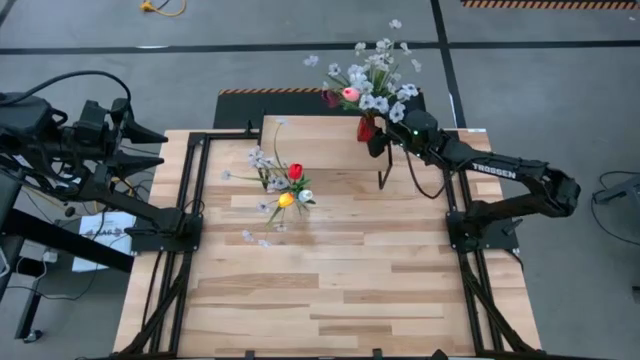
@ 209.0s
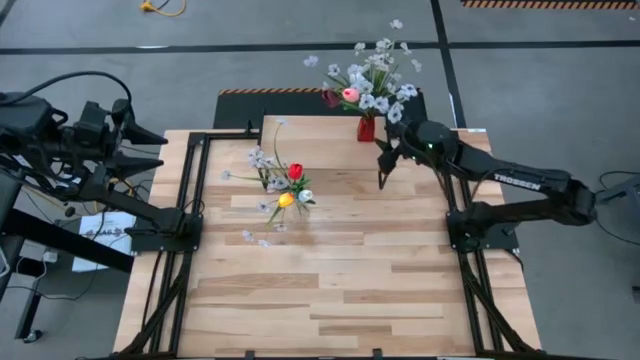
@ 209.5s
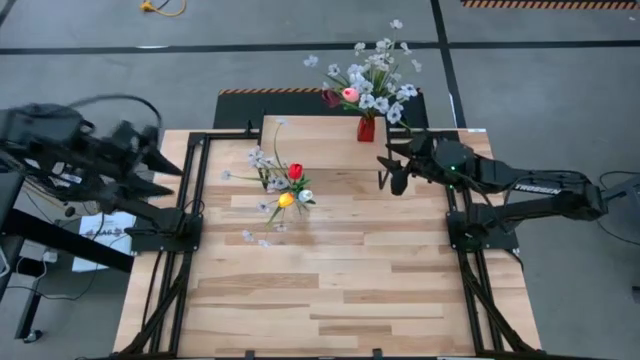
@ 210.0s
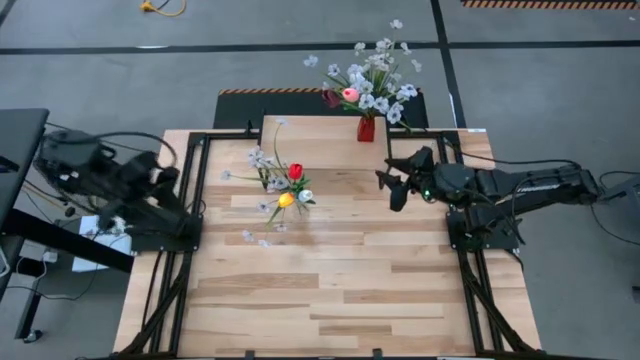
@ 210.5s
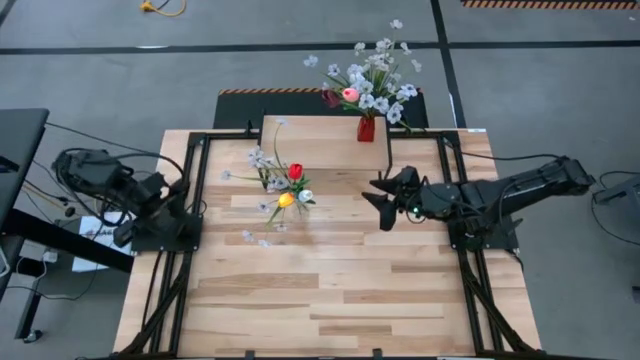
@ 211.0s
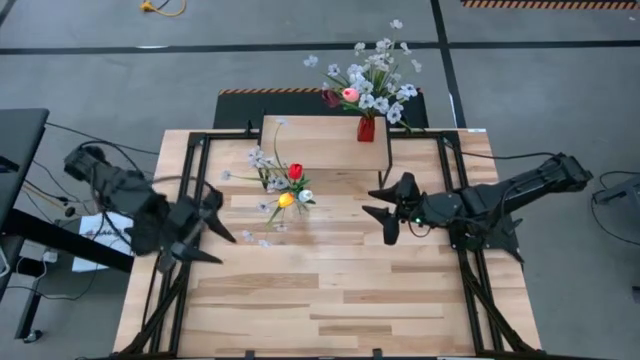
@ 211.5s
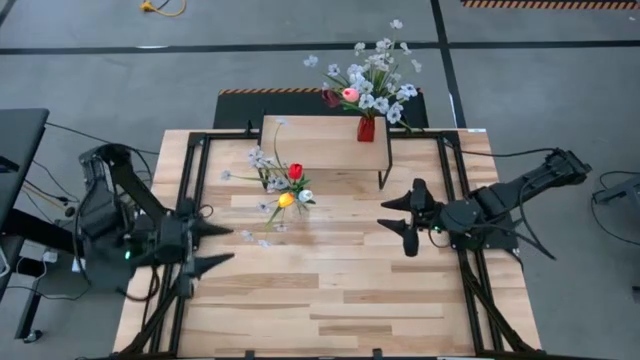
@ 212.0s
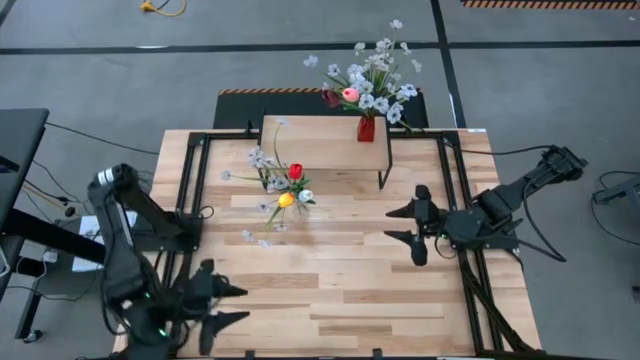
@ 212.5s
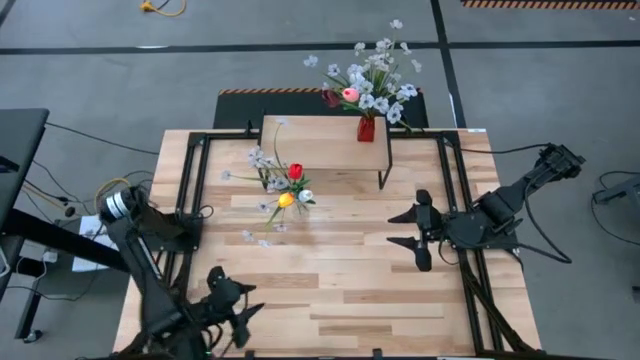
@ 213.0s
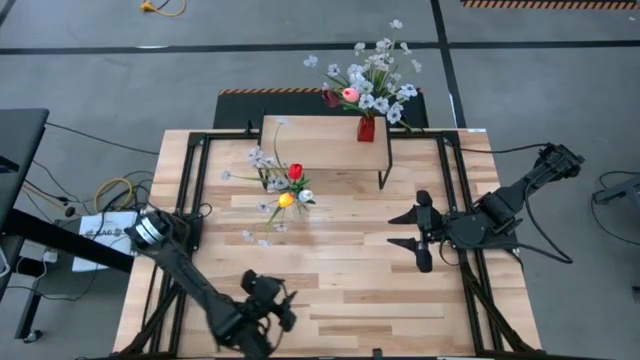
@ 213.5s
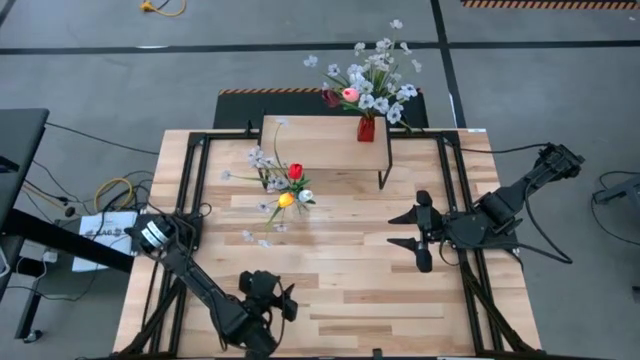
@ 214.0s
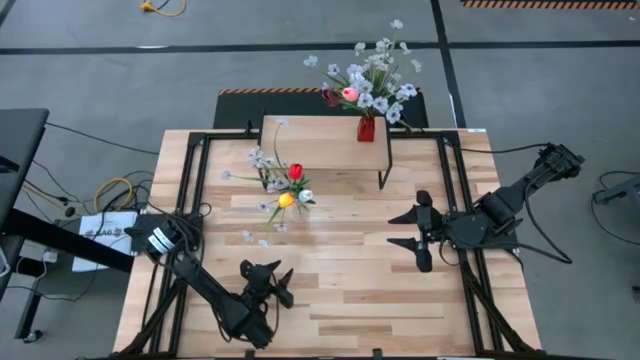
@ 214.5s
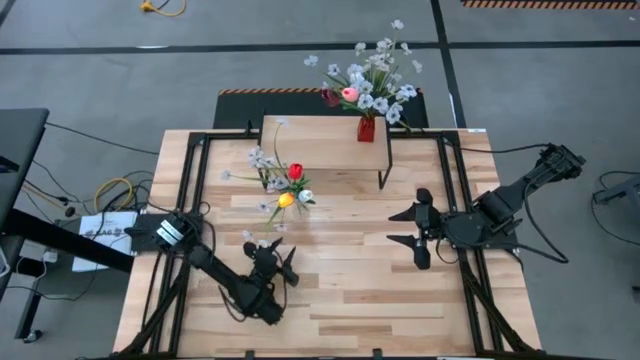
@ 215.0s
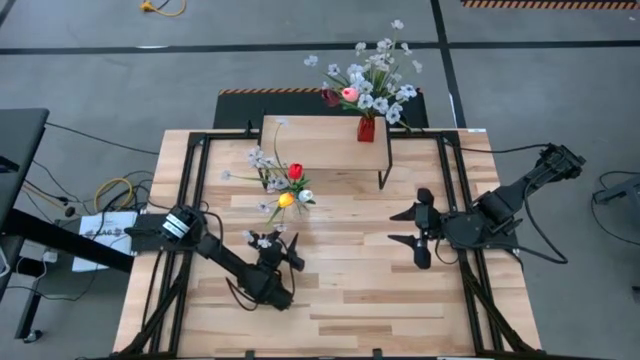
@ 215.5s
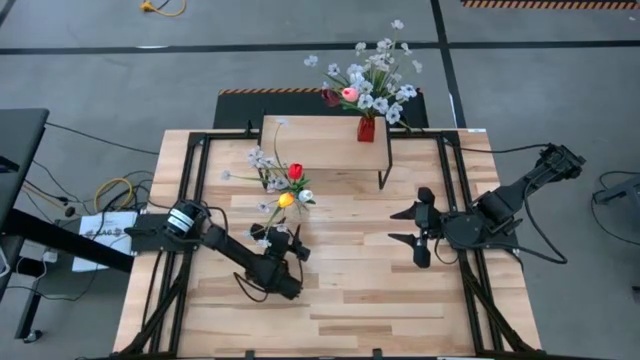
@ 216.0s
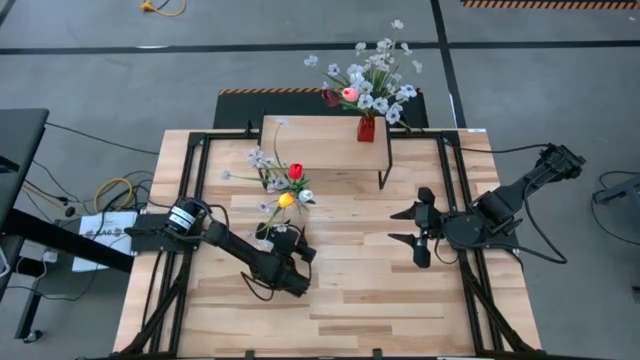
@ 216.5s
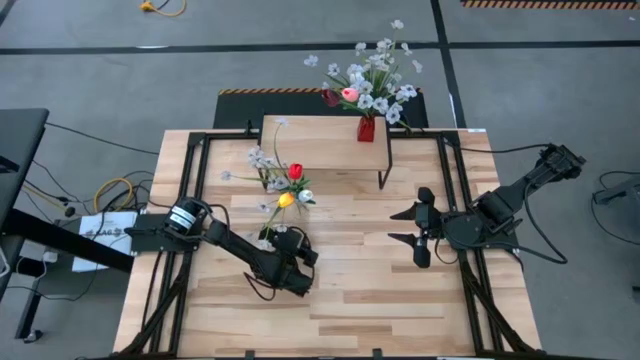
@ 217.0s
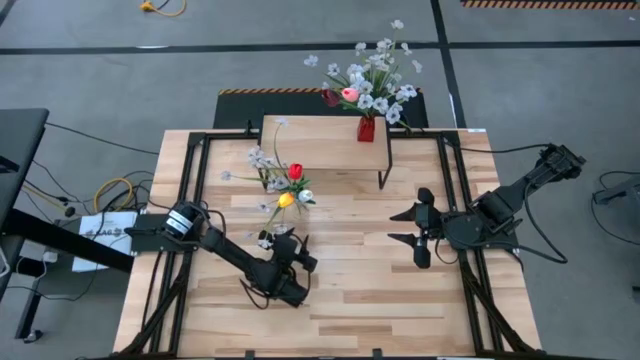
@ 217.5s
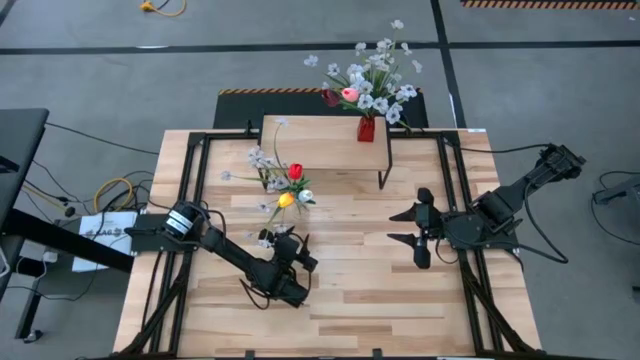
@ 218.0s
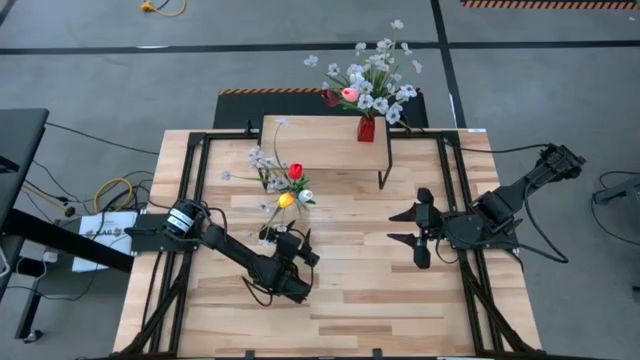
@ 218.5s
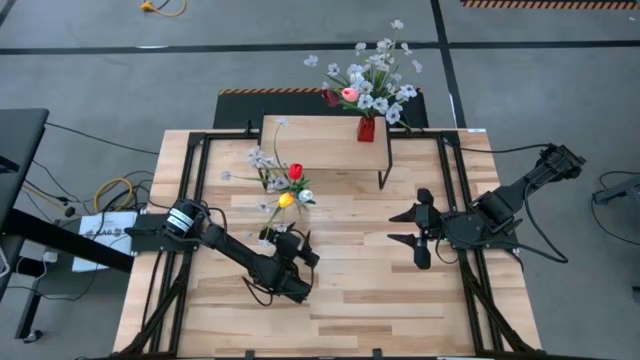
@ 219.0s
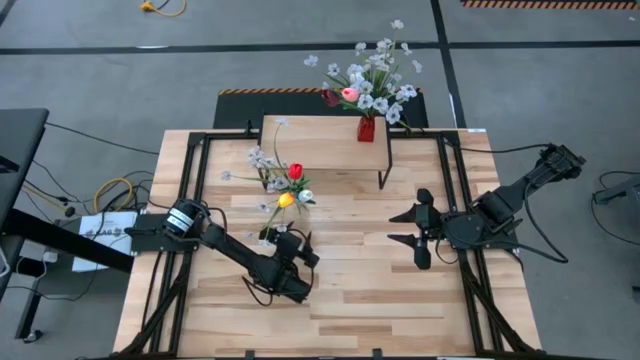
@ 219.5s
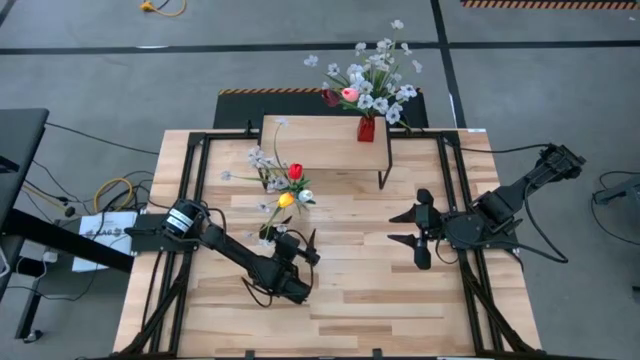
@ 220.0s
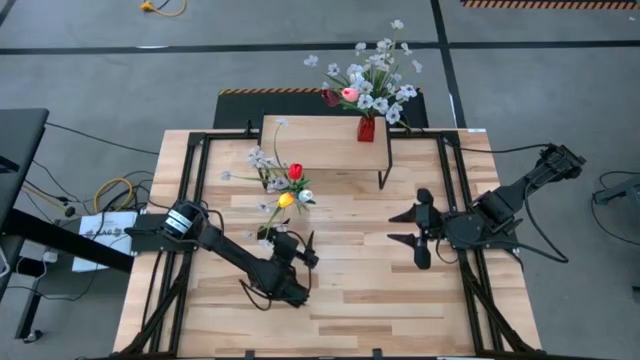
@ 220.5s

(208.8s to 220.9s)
Task: Pick and place flowers into a vace then onto a shelf
Put the transparent vase with flowers on the shelf

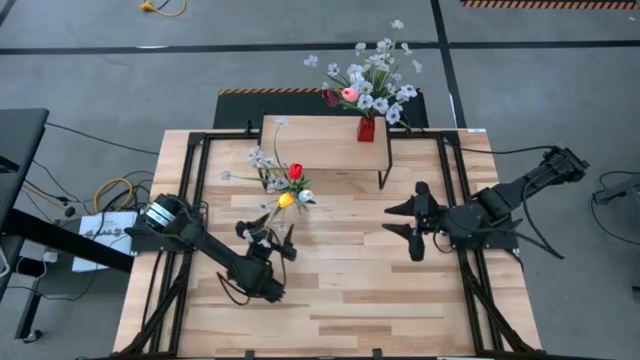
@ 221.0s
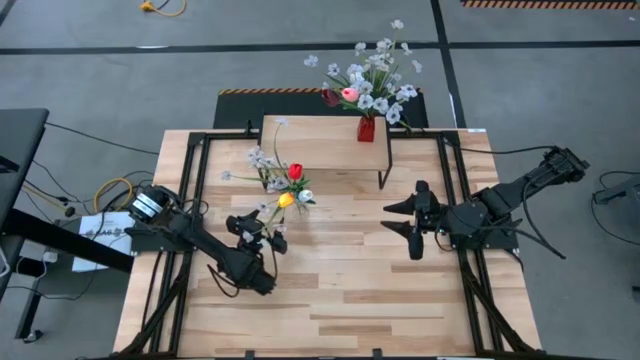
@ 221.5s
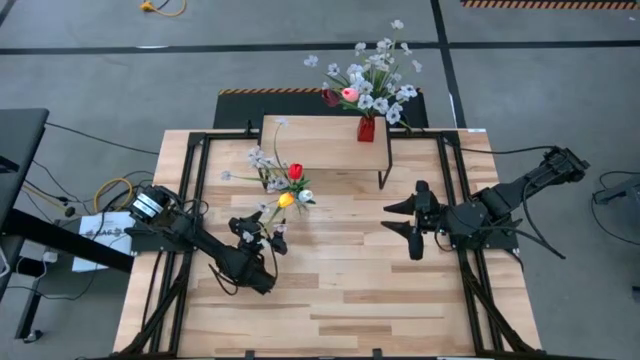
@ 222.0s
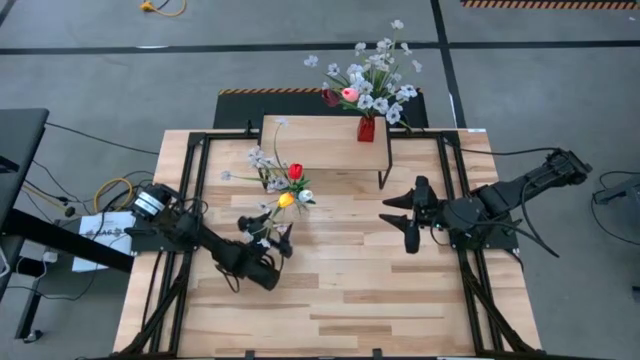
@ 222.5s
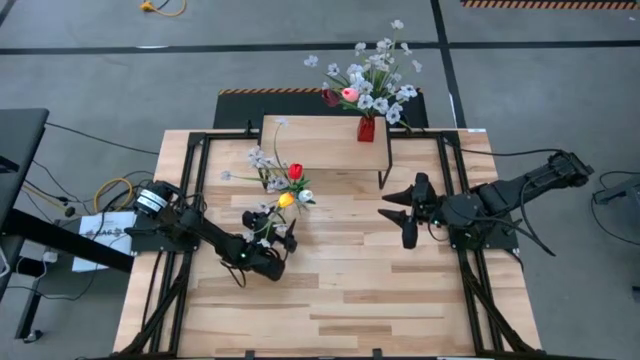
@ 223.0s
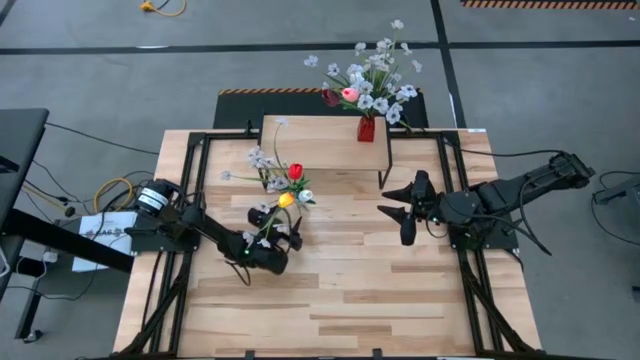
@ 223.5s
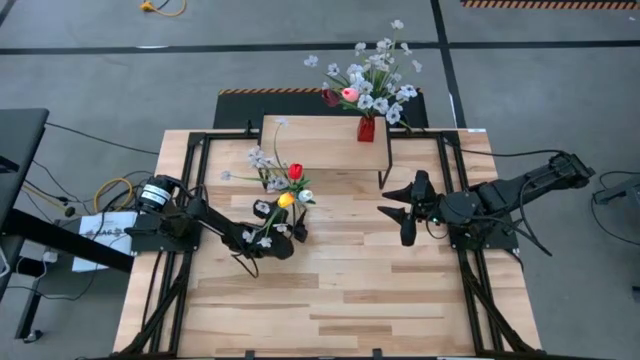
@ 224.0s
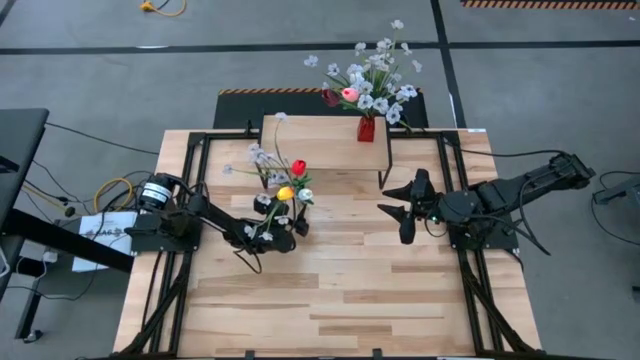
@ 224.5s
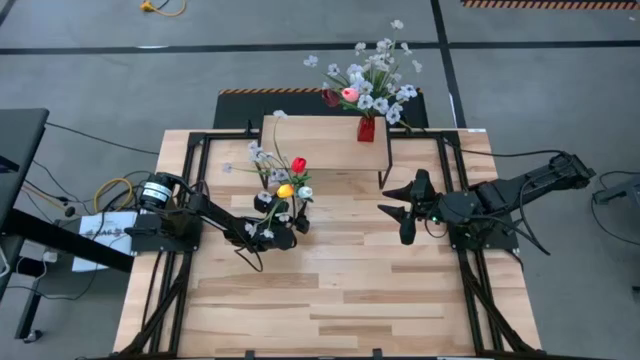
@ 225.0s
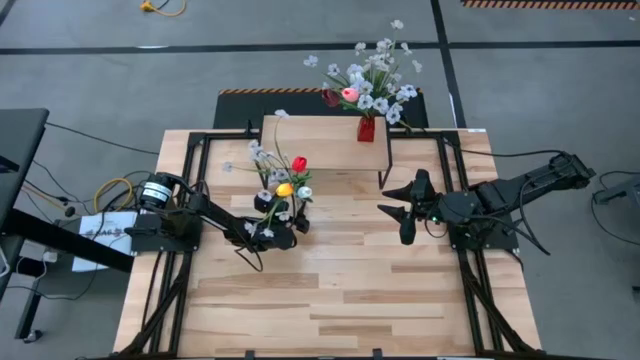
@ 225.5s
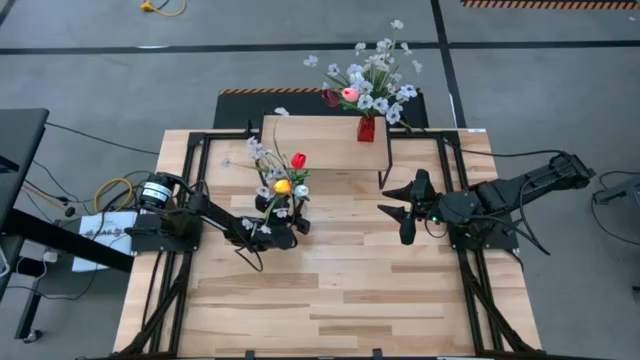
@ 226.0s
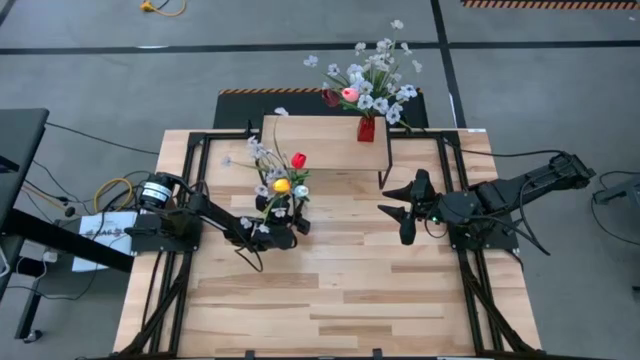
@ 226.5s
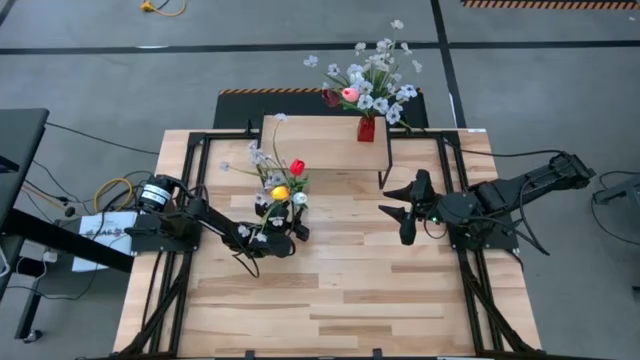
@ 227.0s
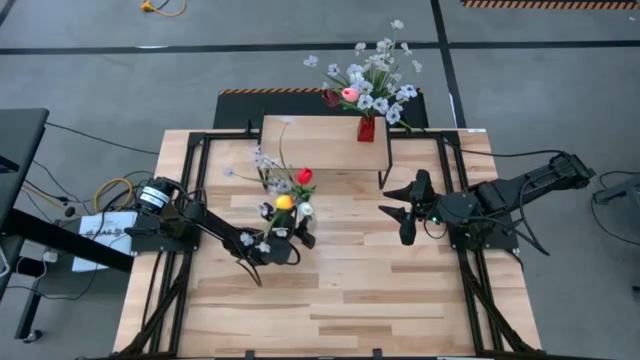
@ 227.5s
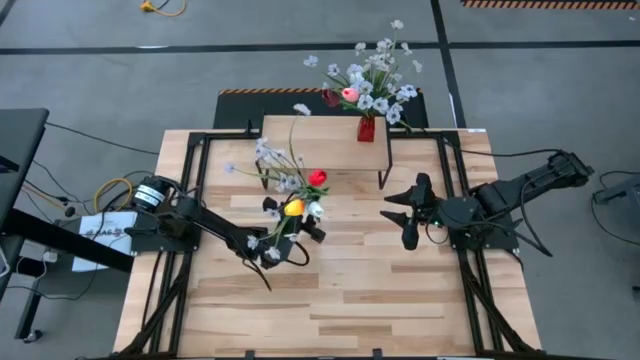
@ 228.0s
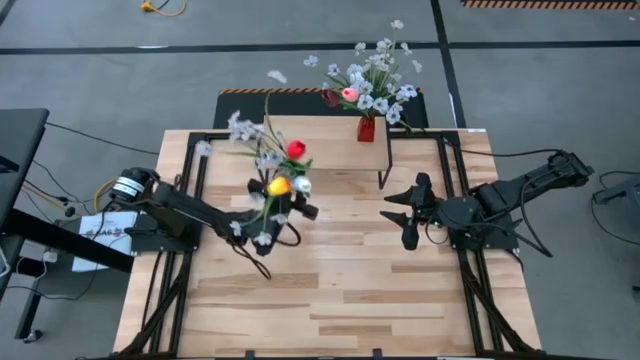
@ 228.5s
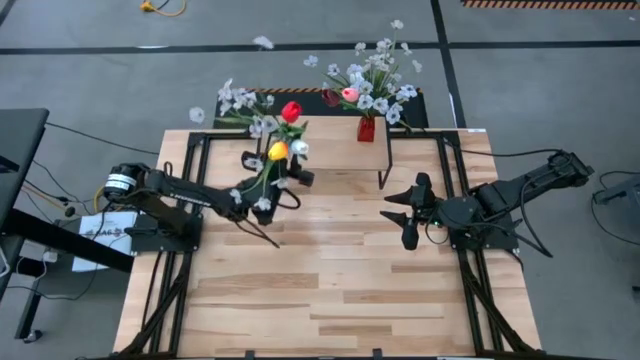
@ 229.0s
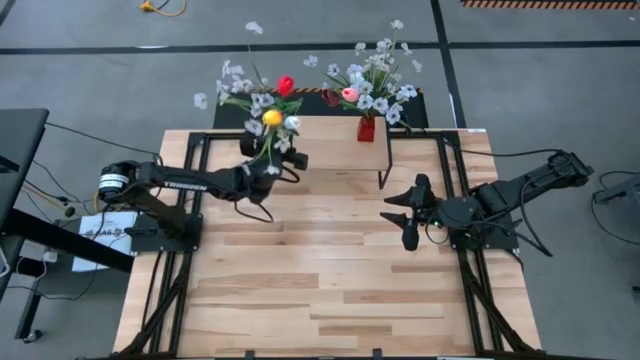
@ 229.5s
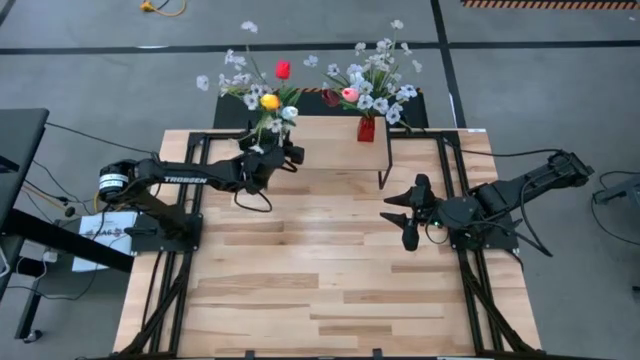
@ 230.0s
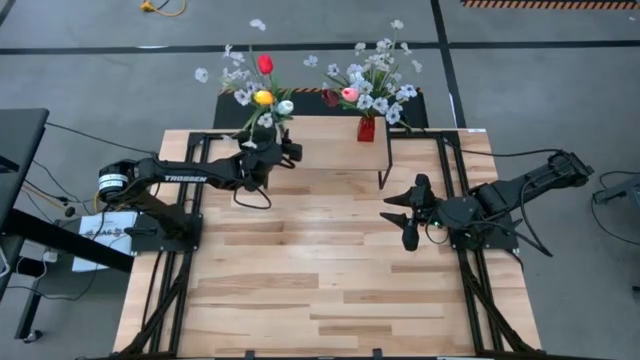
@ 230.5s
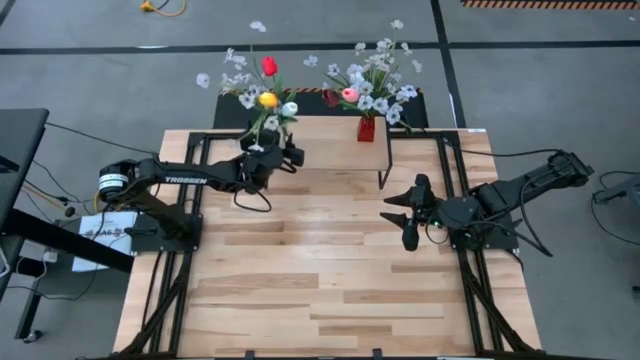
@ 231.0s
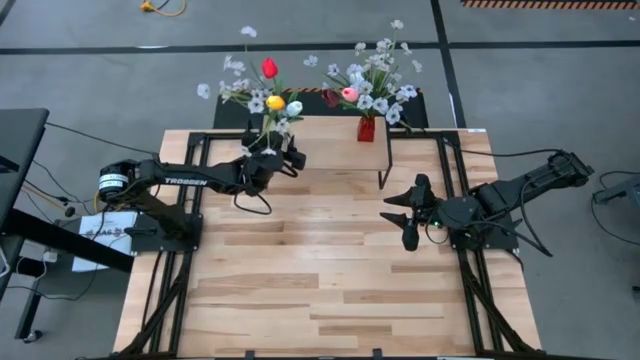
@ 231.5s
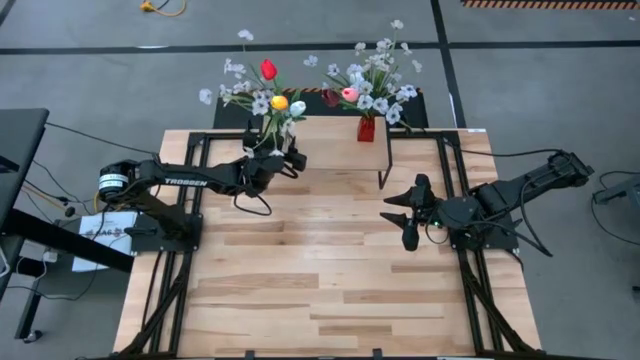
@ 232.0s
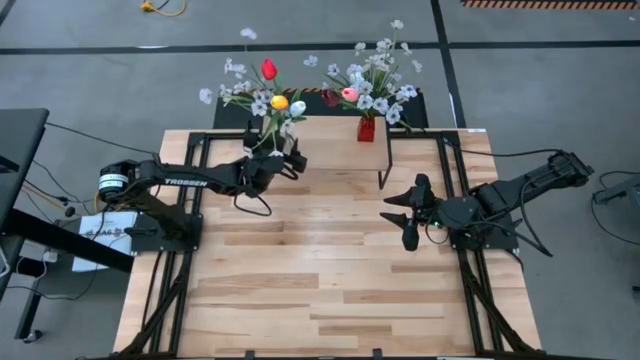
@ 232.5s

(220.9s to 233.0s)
Put the transparent vase with flowers on the shelf
